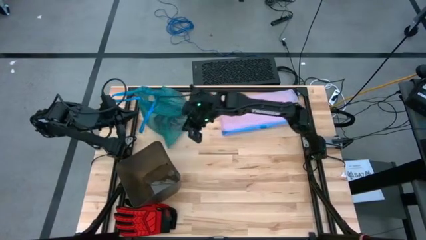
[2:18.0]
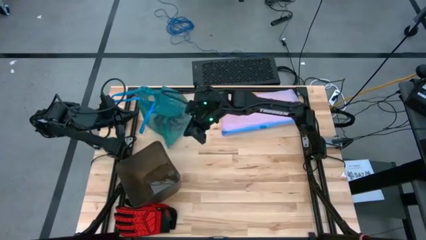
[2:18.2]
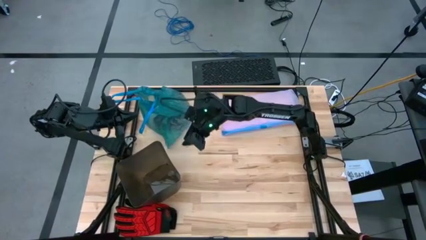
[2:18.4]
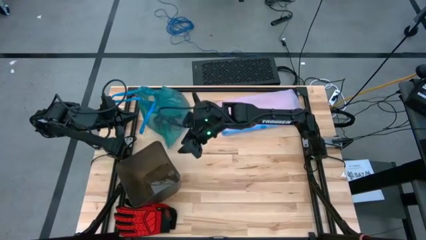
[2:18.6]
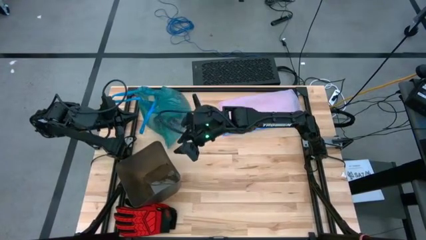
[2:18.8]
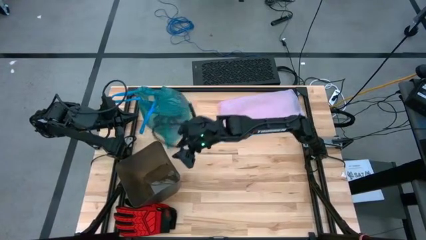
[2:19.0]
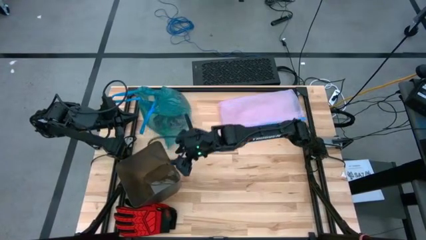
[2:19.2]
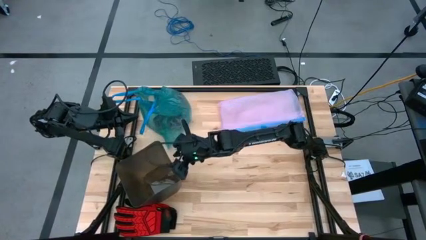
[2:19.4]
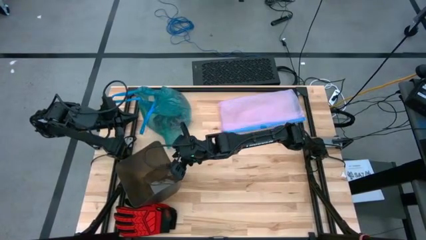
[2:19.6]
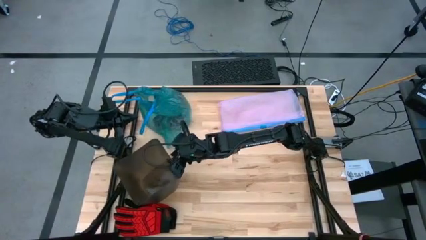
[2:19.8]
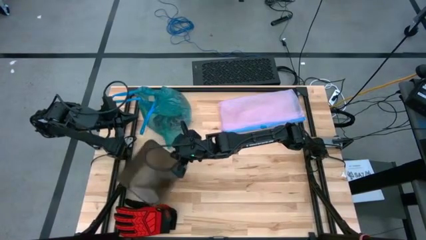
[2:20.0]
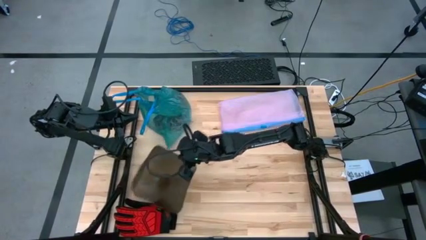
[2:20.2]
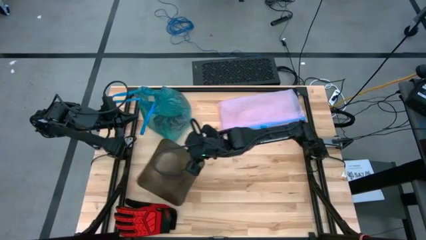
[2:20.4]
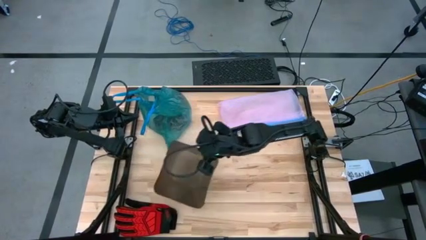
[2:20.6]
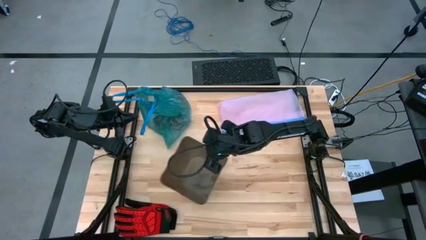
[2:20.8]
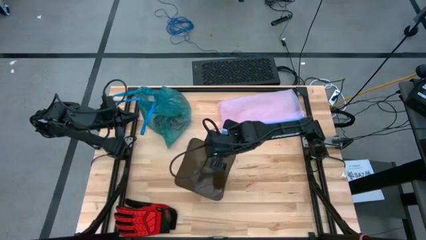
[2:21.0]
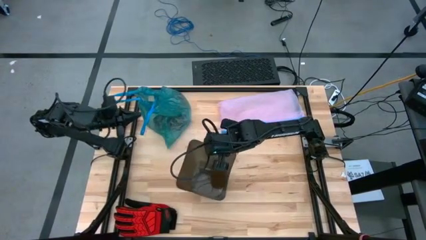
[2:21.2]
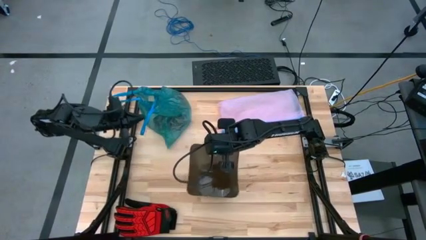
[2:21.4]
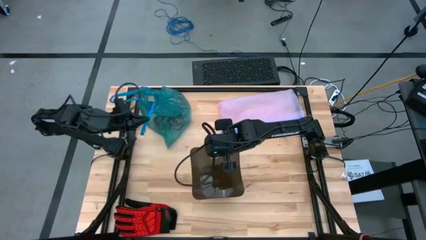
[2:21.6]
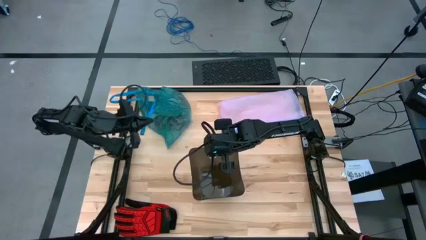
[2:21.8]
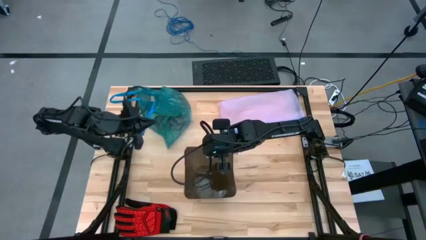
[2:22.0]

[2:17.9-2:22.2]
Task: place trash/remove bag and relplace
Move the trash bin to the center of the table

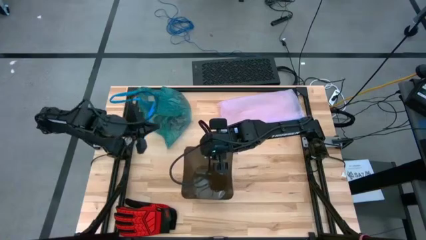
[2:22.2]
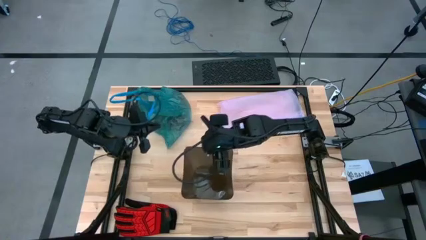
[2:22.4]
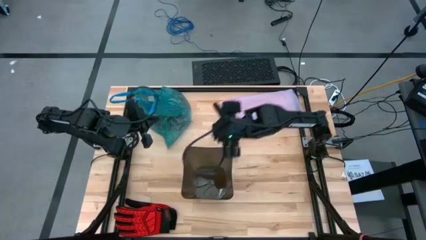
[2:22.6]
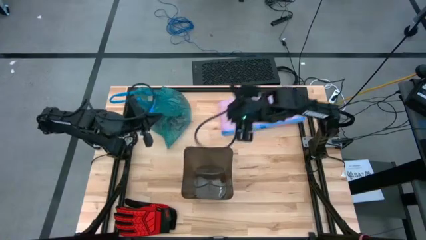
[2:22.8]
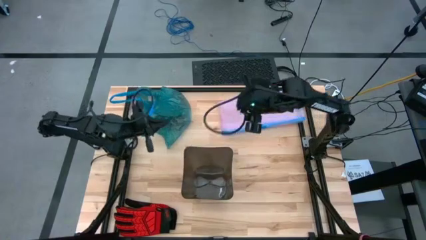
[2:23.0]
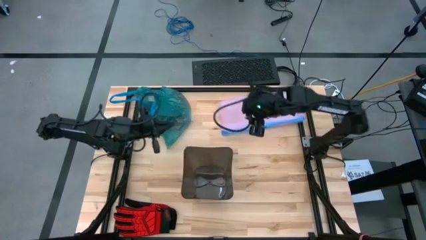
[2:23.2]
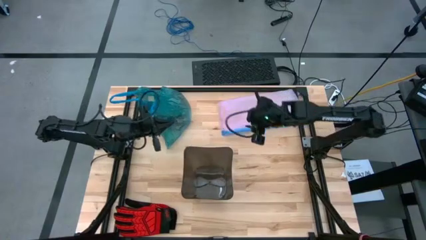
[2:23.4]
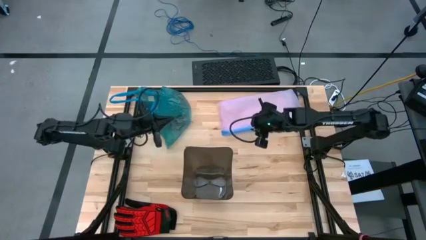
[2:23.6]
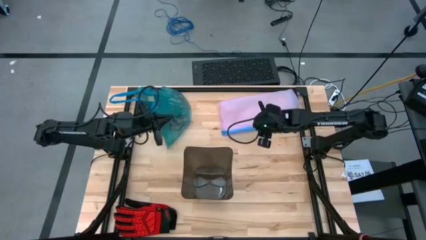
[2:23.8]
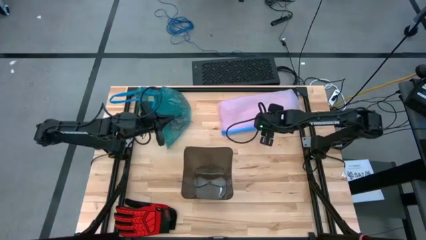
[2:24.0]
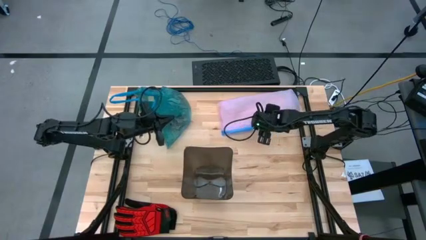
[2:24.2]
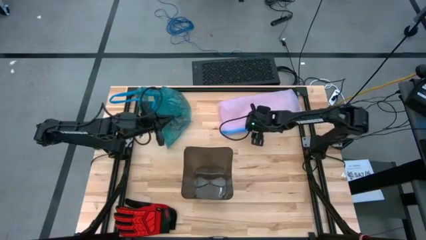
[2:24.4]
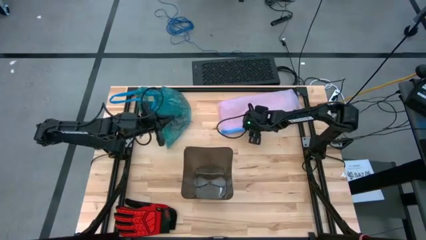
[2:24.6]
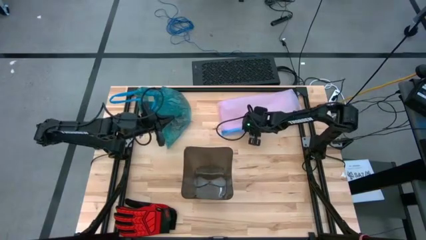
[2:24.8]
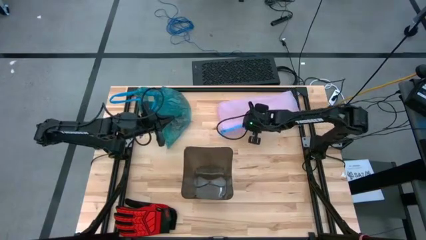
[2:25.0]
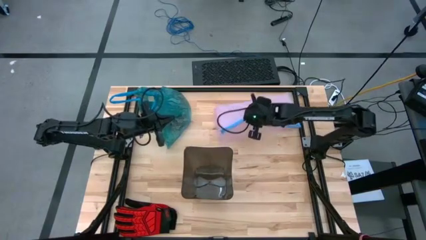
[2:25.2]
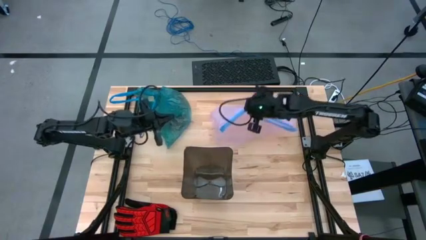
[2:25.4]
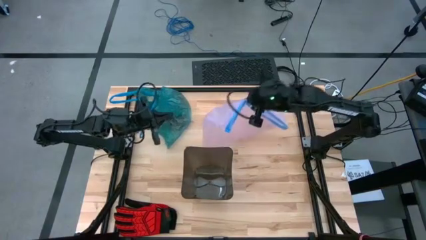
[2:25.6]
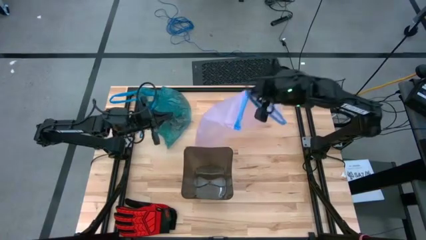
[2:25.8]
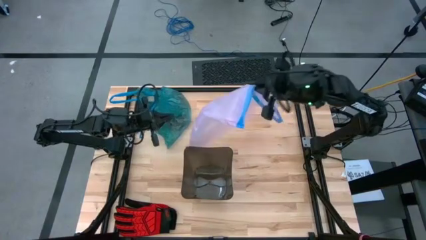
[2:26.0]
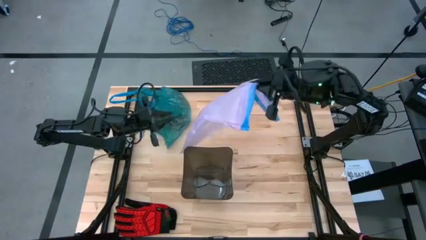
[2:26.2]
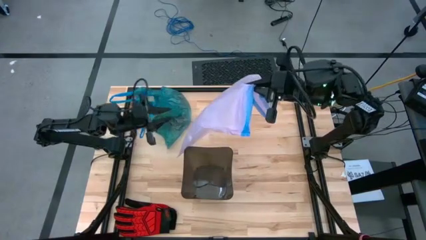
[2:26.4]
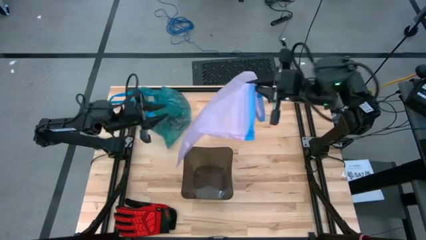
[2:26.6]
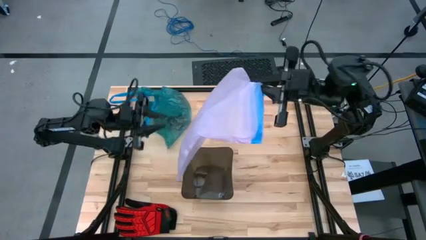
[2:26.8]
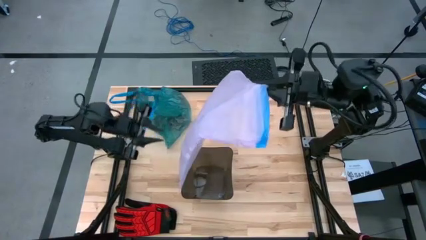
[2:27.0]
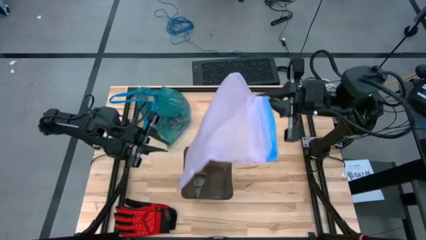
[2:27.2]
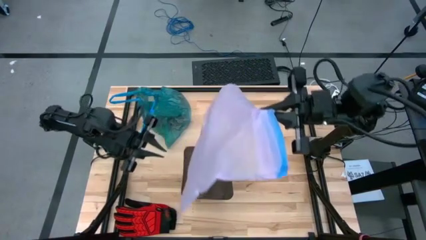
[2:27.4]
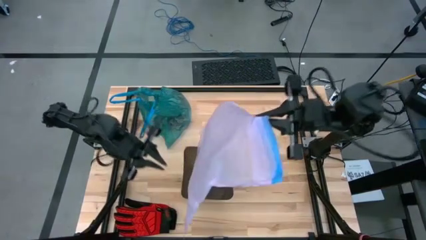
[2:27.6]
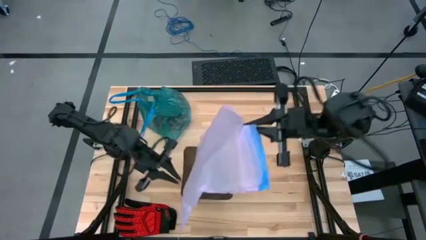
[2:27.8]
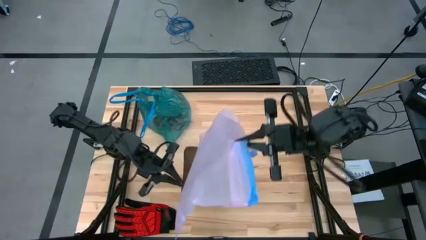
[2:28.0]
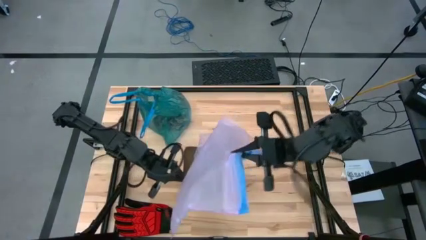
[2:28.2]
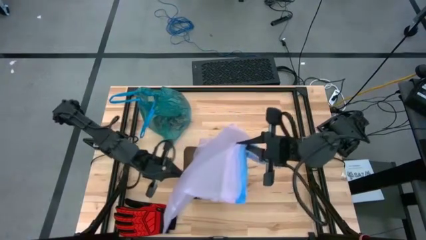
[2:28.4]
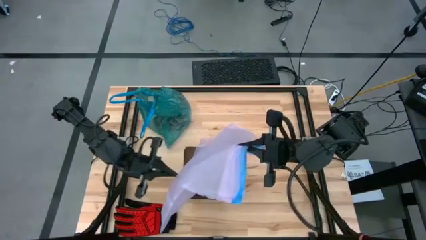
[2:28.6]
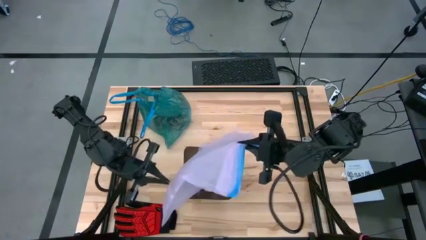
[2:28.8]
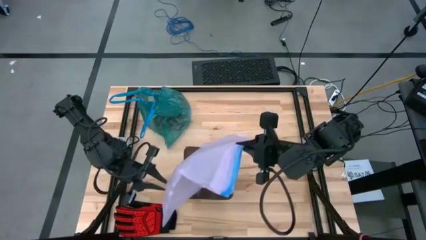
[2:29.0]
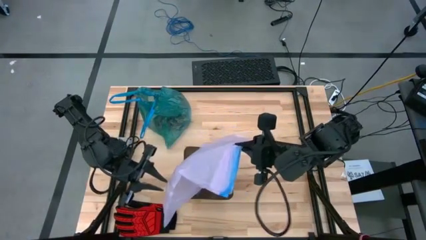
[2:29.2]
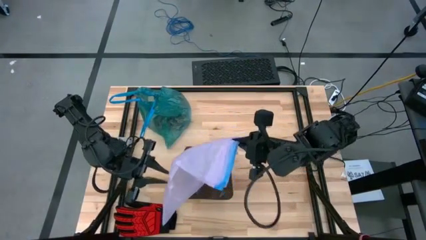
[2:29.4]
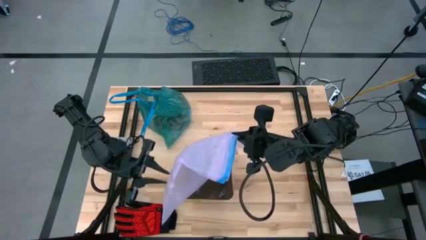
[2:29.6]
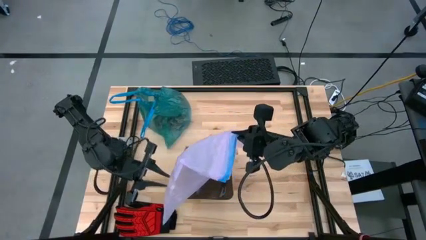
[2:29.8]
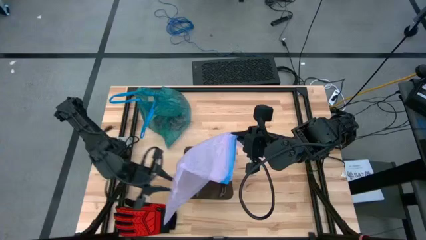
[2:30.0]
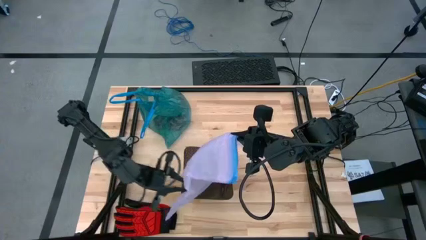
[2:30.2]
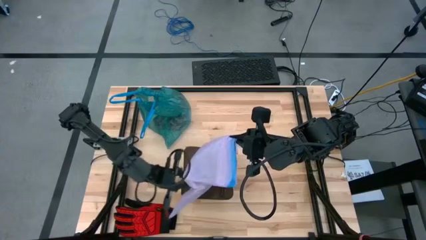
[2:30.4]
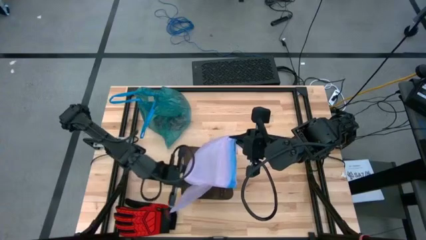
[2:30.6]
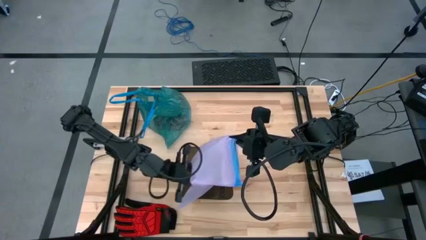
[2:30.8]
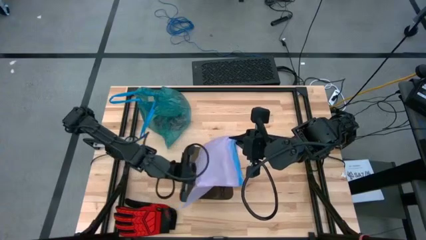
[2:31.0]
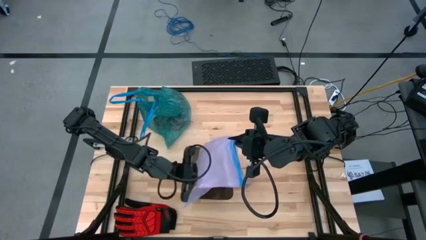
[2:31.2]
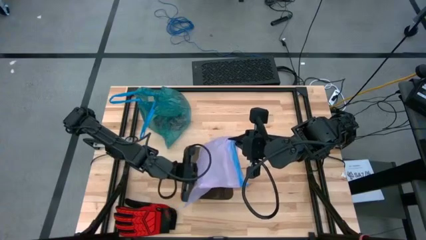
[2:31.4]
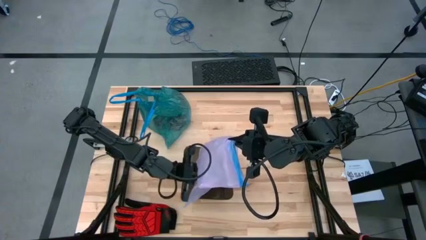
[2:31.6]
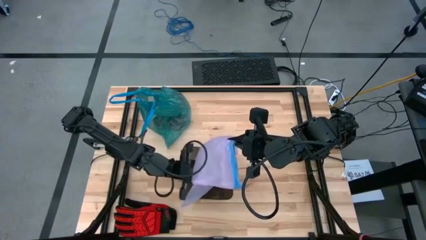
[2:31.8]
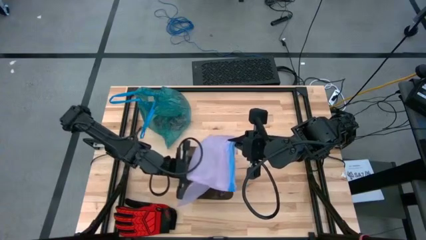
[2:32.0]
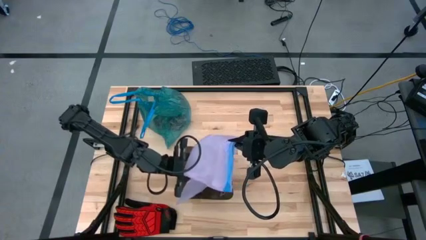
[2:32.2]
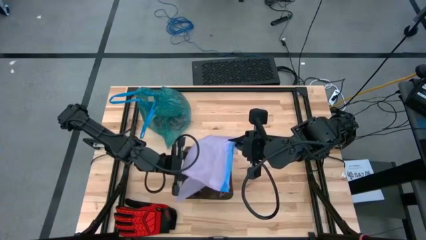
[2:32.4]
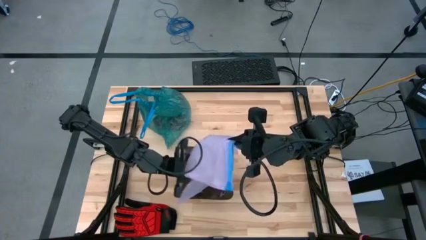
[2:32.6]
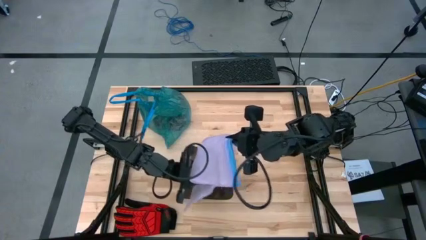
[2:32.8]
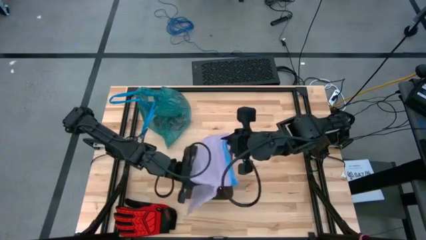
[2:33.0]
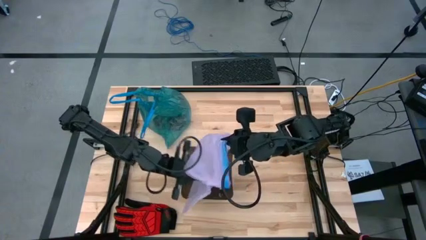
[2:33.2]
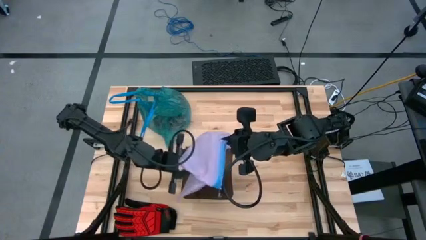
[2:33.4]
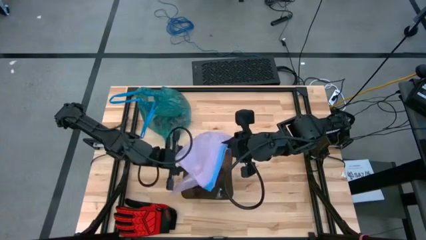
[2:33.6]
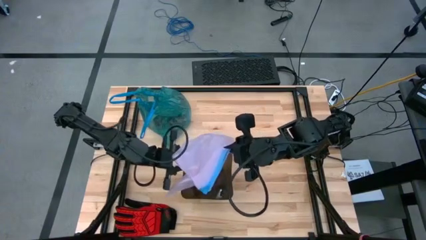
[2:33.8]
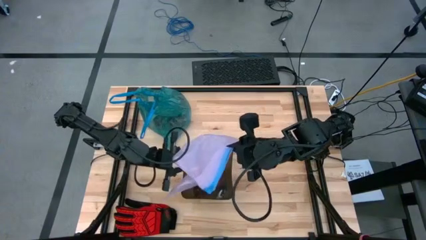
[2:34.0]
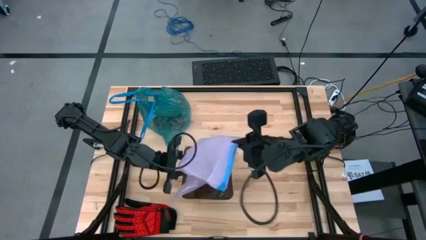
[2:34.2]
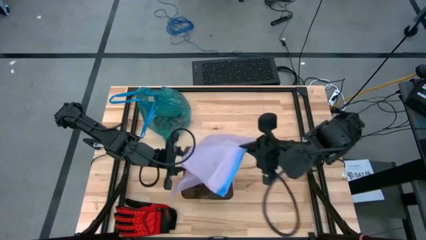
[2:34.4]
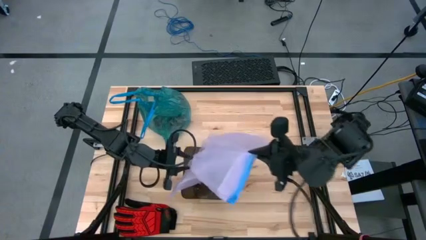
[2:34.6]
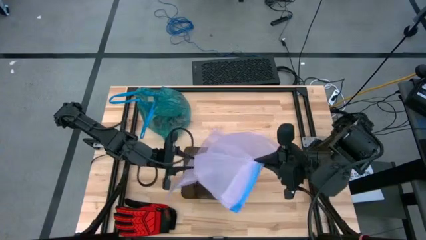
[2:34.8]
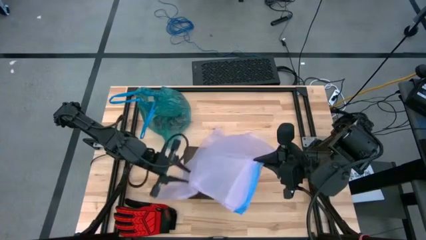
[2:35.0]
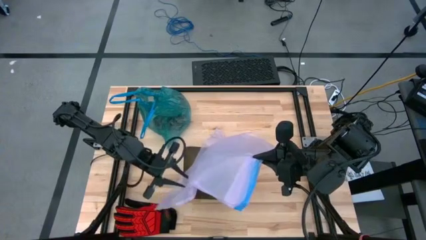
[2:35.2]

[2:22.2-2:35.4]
Insert the trash bag into the trash bin
